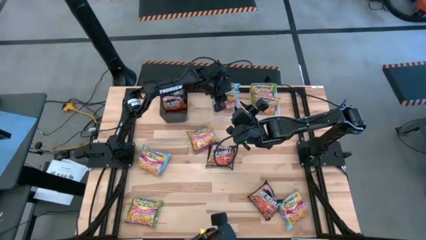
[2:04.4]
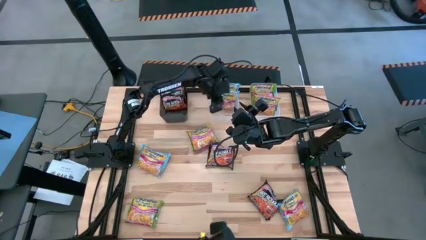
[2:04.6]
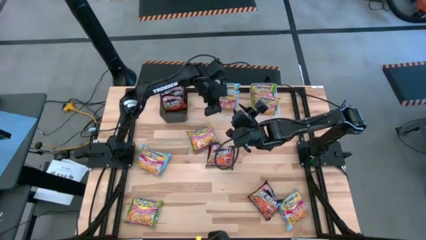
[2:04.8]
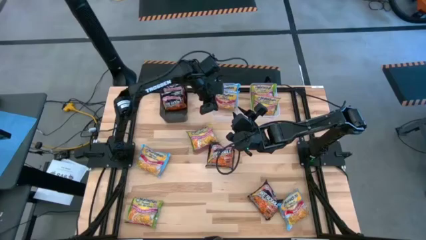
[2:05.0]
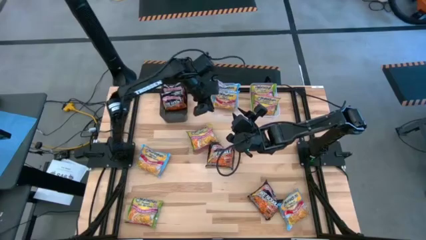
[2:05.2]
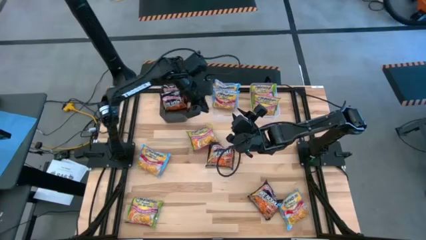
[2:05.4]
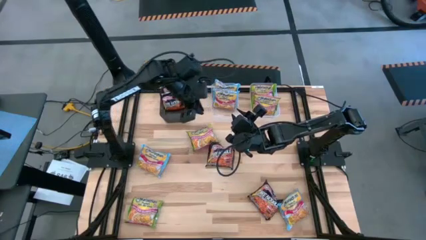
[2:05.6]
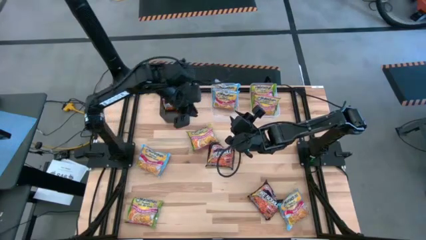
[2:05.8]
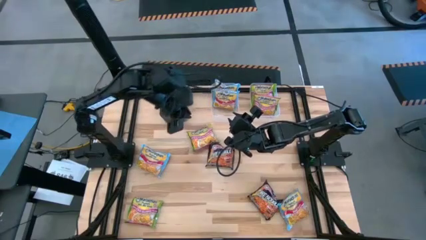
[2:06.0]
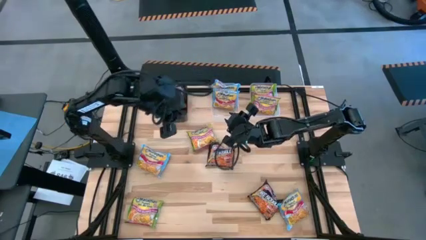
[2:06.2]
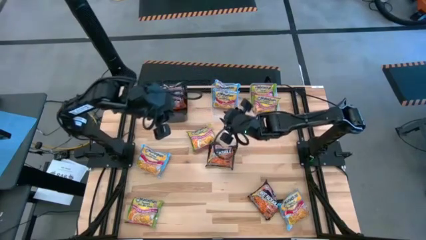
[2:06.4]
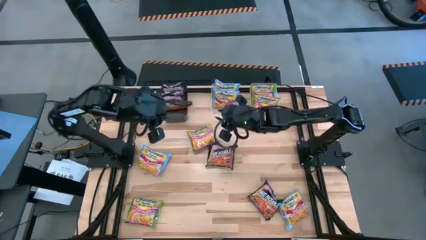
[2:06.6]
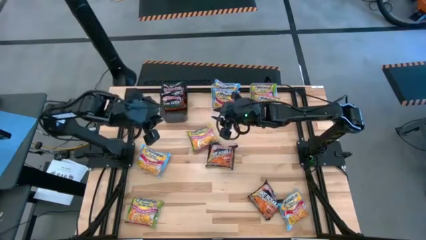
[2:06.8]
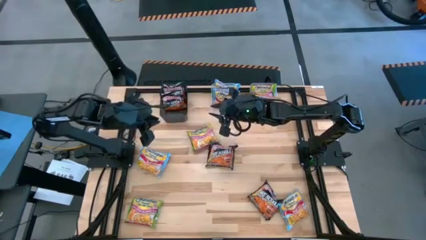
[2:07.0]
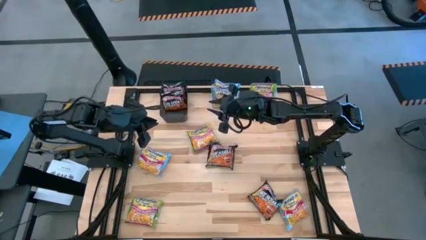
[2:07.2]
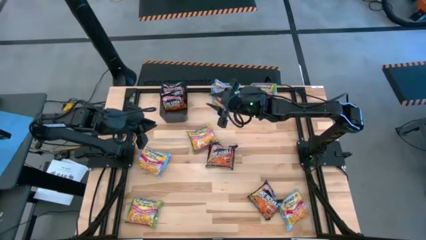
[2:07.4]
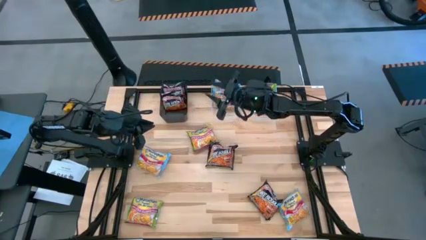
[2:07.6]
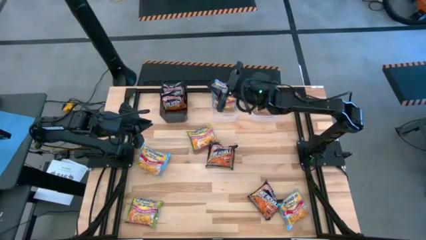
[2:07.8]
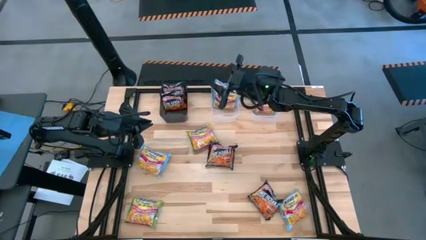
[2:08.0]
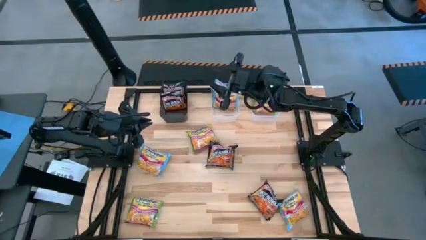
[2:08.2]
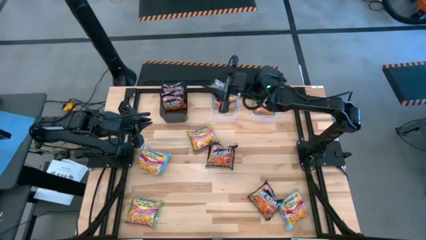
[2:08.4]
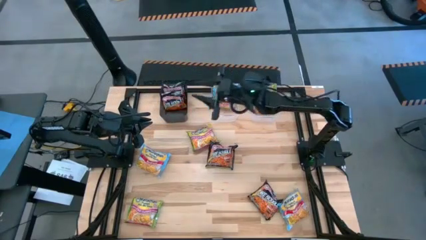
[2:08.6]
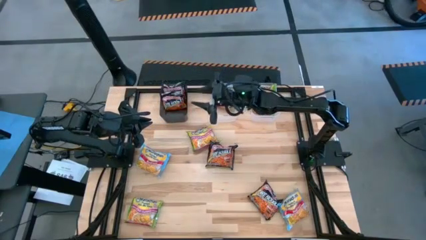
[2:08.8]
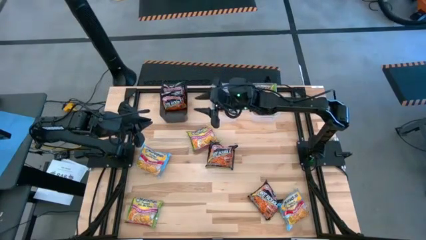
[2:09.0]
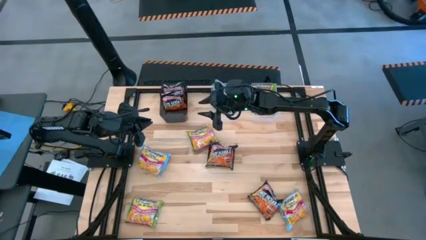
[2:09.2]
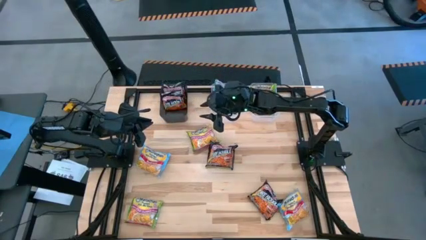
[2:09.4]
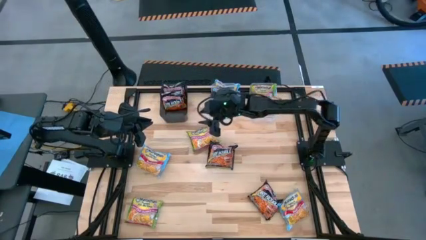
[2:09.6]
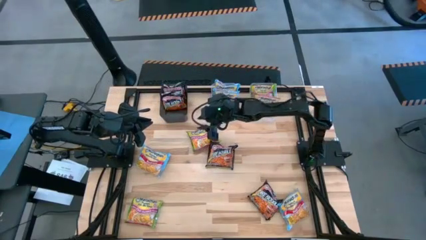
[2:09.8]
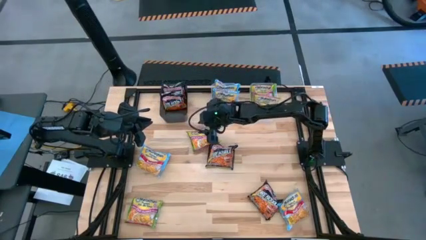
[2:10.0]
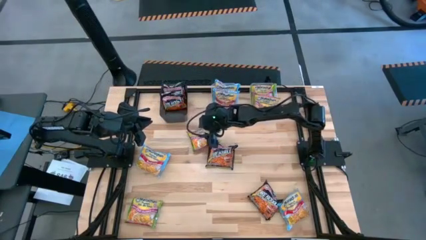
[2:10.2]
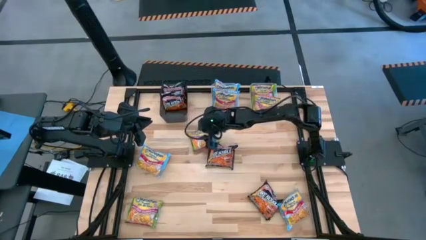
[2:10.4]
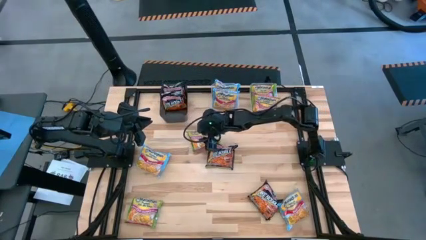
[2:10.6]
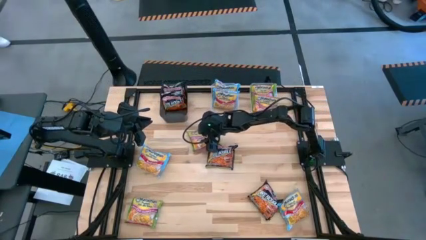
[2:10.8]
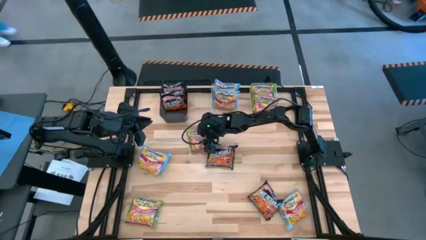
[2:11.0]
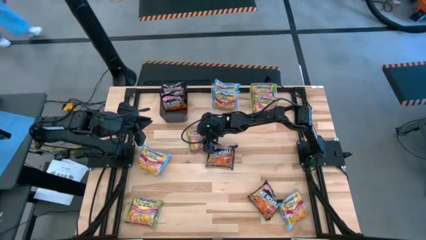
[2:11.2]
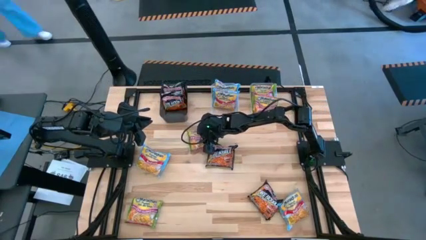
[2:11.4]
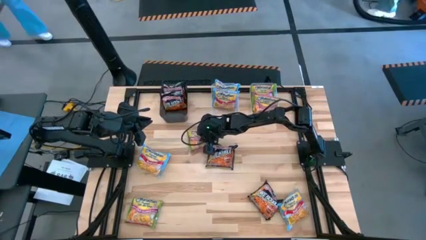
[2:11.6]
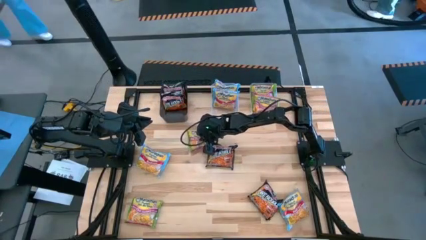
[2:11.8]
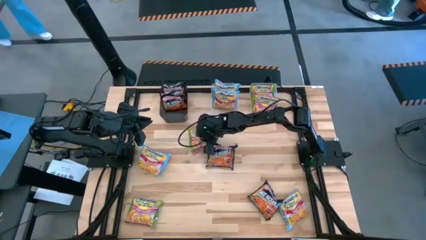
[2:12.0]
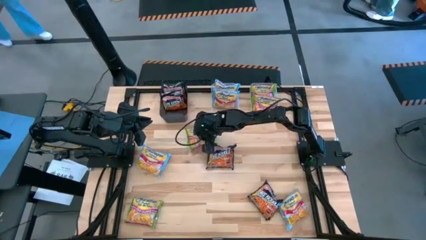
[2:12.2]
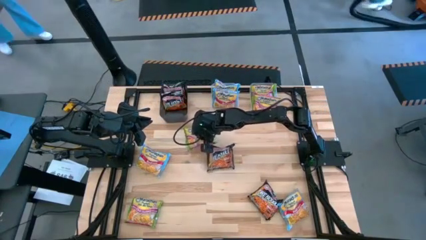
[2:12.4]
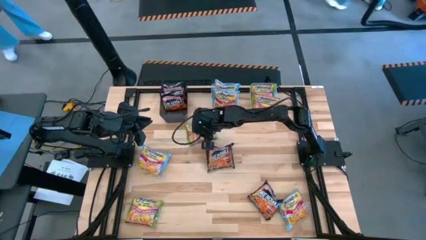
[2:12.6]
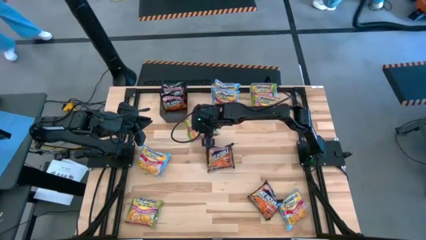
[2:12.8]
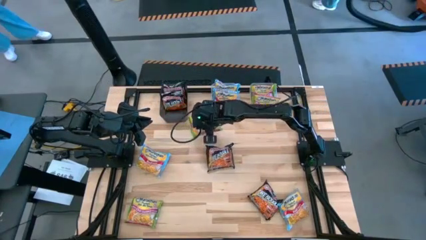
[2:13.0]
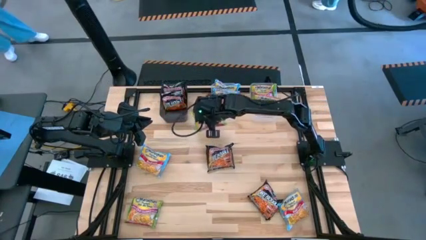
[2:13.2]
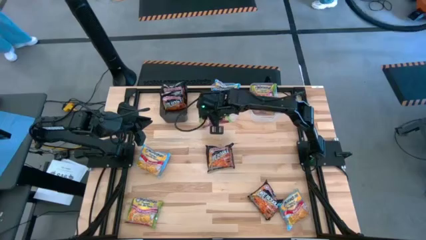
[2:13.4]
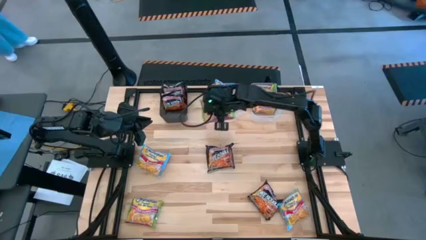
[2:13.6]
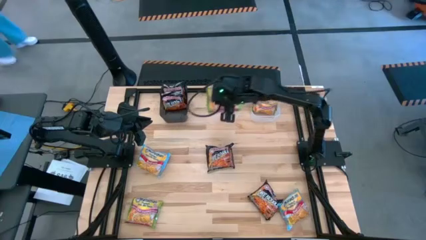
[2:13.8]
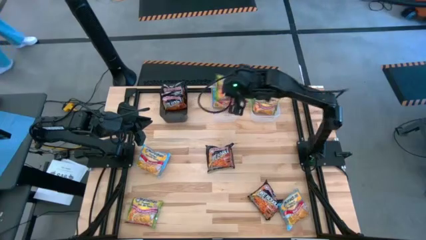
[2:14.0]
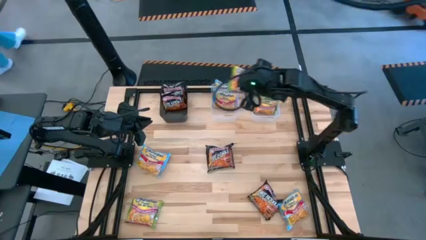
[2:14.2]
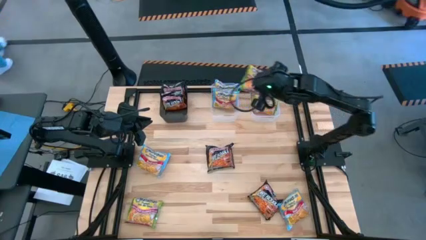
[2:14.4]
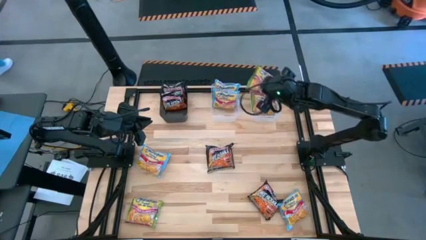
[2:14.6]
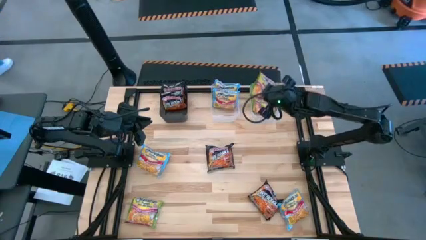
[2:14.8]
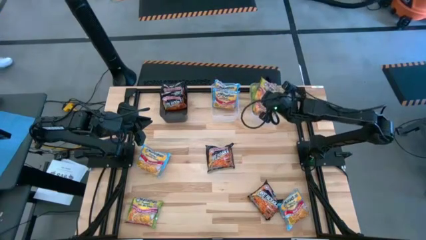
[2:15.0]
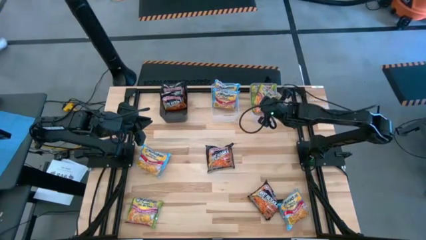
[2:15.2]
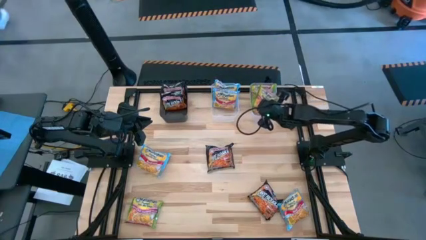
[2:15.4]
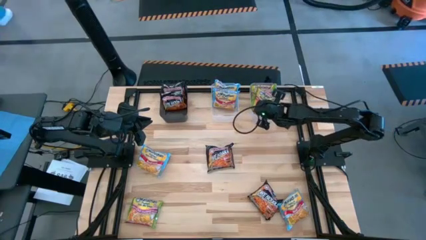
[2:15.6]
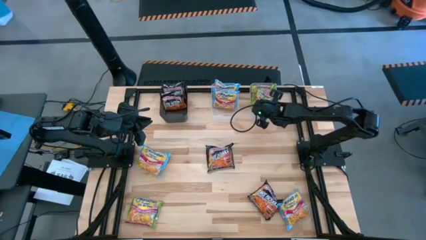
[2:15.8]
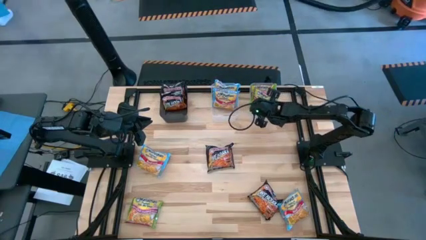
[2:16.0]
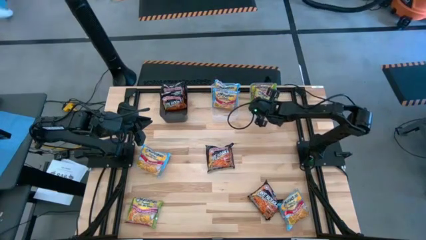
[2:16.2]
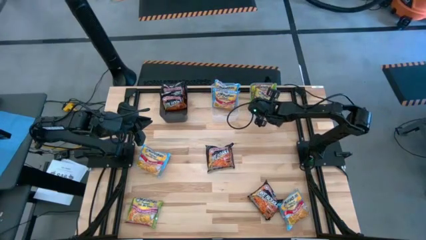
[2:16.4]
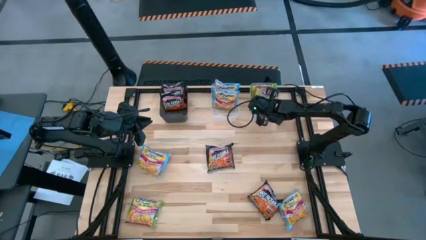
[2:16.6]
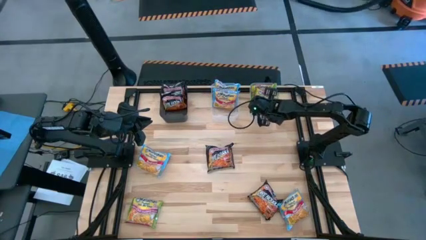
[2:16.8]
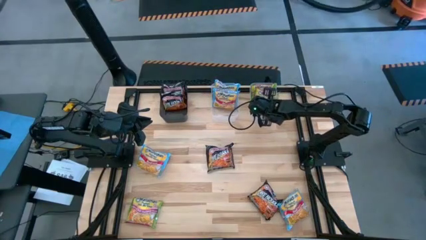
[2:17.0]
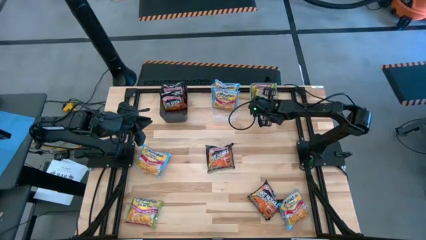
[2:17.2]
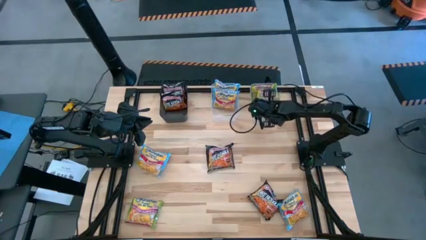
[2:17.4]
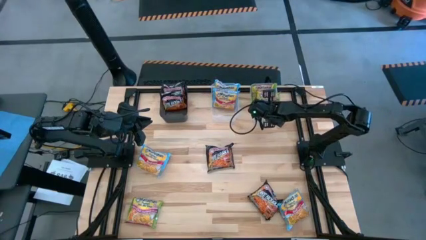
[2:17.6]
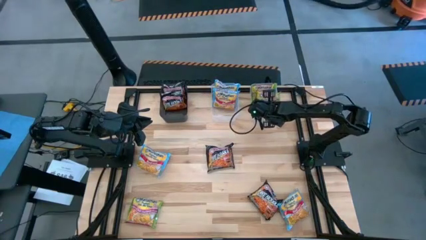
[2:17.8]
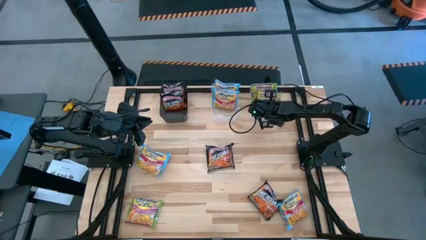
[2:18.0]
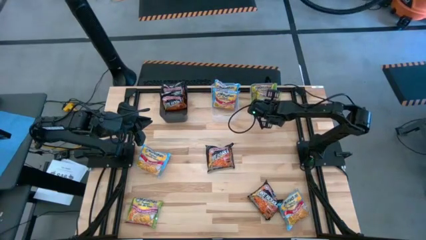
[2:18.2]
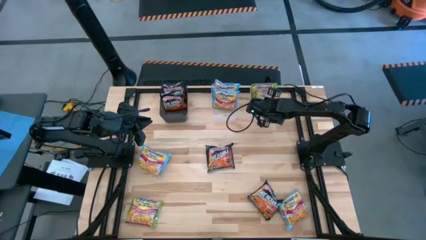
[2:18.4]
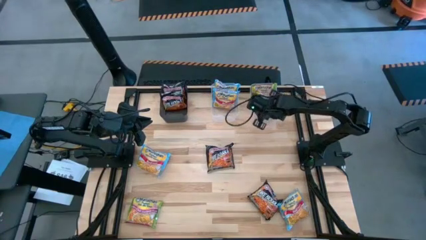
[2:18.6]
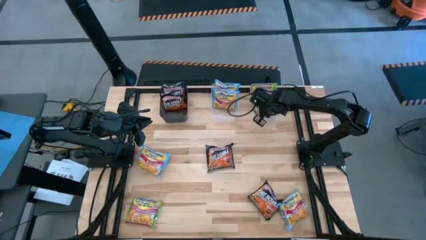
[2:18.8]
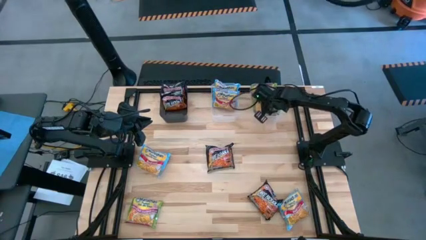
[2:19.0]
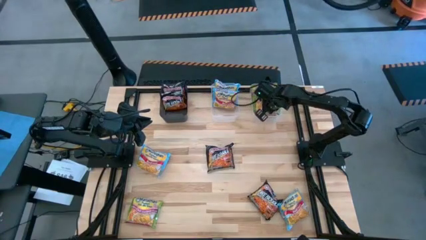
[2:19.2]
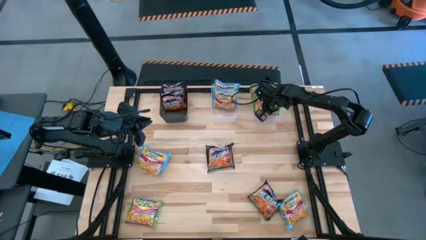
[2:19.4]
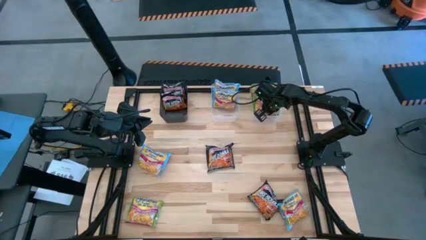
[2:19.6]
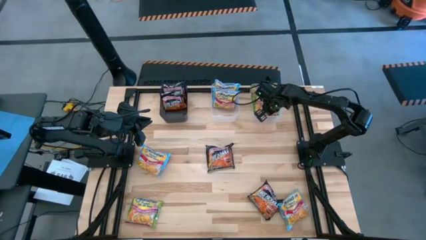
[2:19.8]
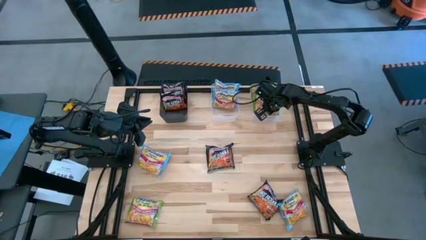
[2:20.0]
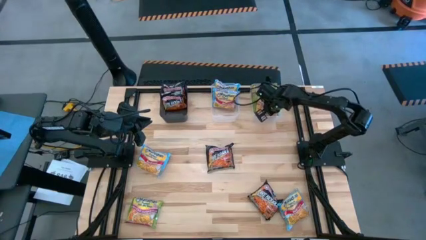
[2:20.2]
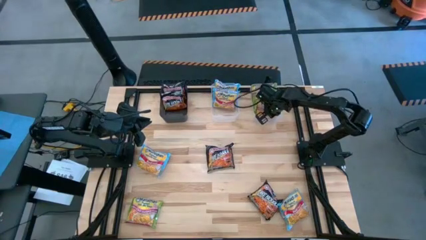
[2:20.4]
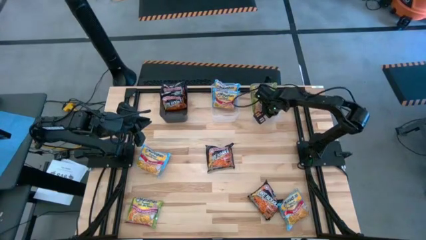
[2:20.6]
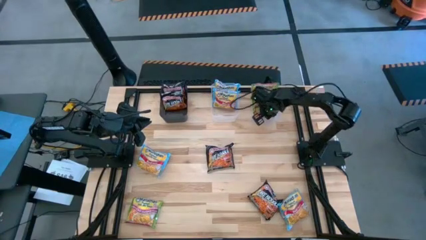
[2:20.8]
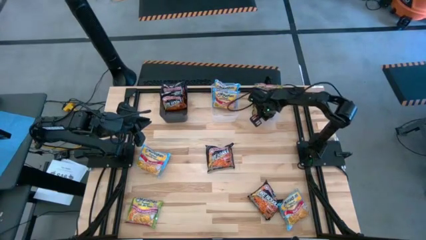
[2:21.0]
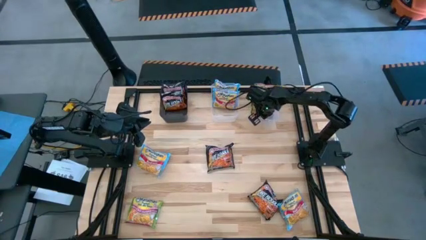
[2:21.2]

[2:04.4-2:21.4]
Task: Sort Maruchan noodles
Put the top green noodle pack into the right transparent bin
